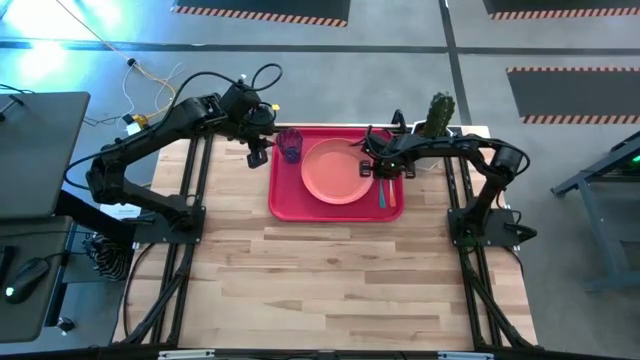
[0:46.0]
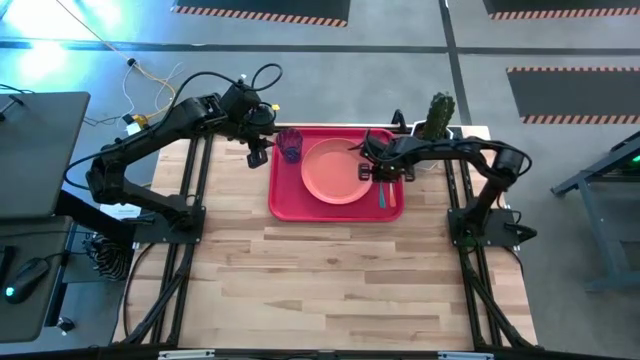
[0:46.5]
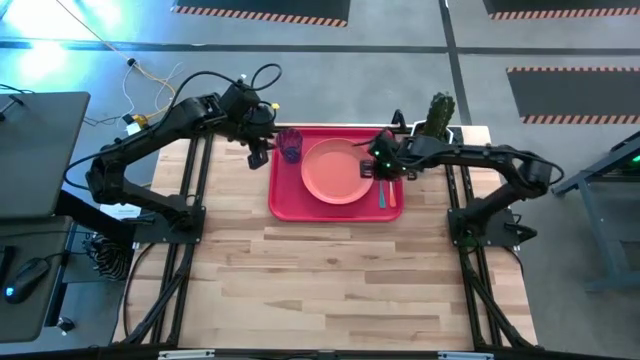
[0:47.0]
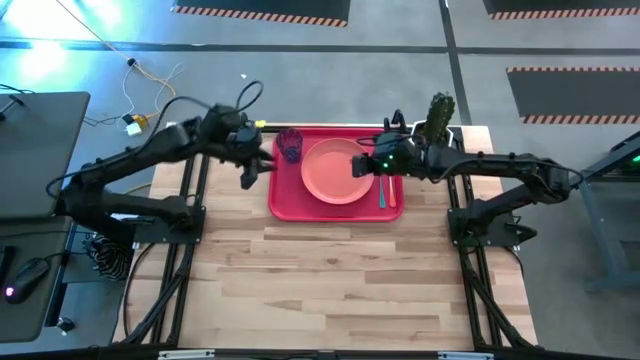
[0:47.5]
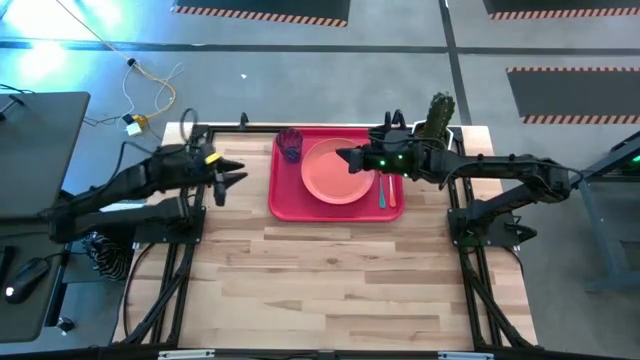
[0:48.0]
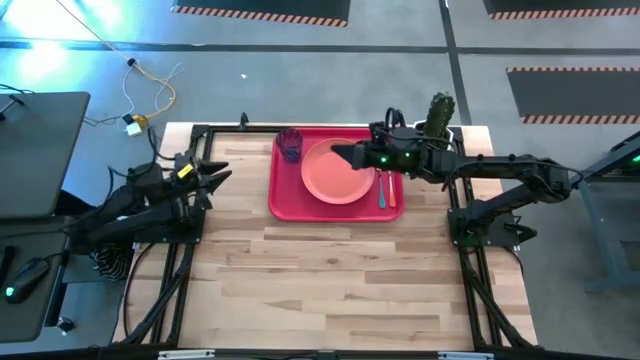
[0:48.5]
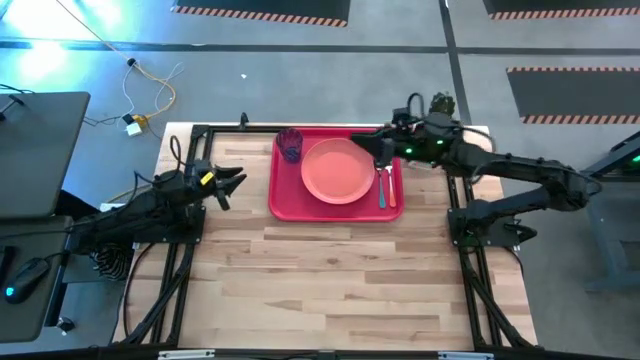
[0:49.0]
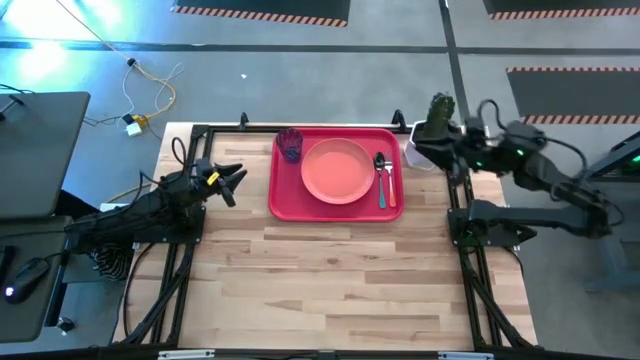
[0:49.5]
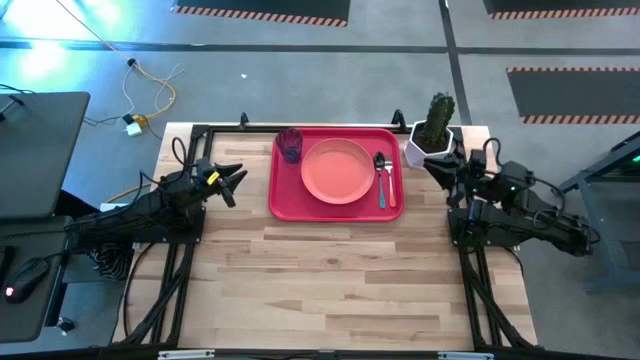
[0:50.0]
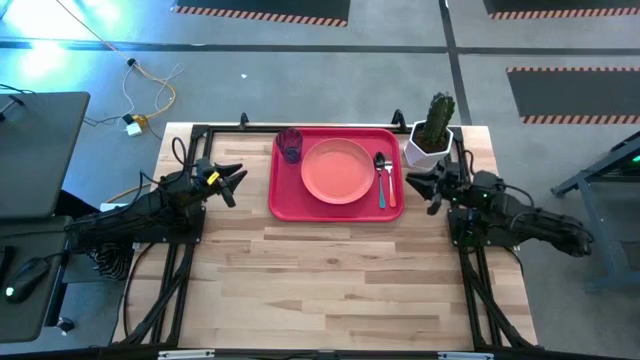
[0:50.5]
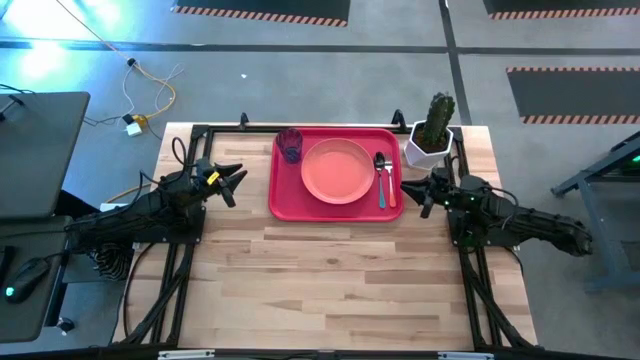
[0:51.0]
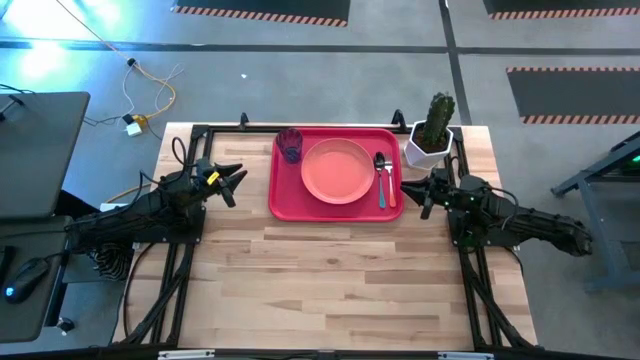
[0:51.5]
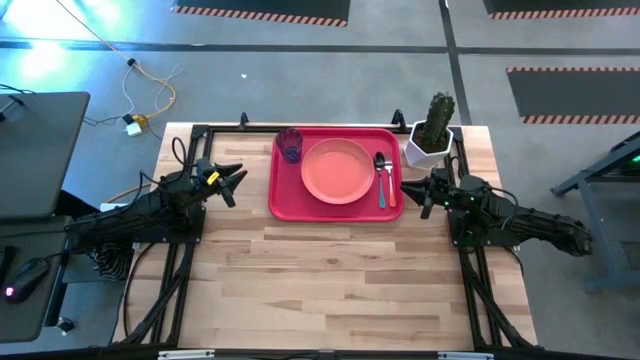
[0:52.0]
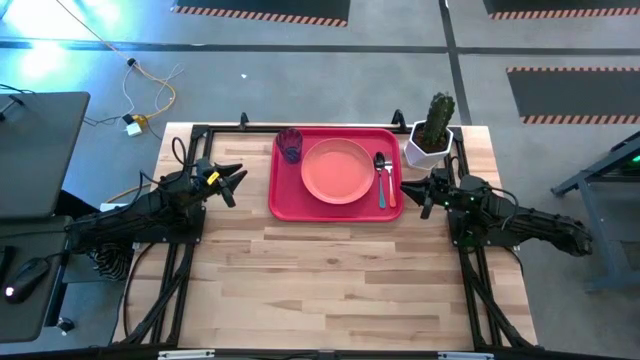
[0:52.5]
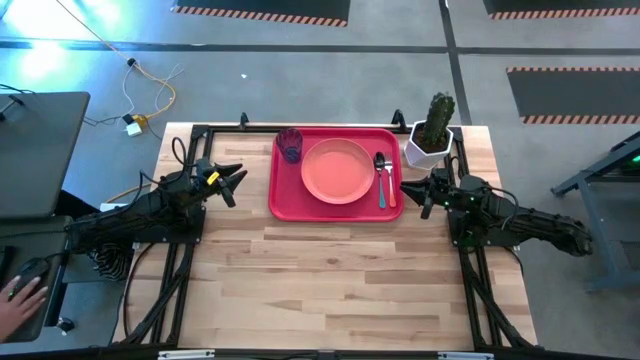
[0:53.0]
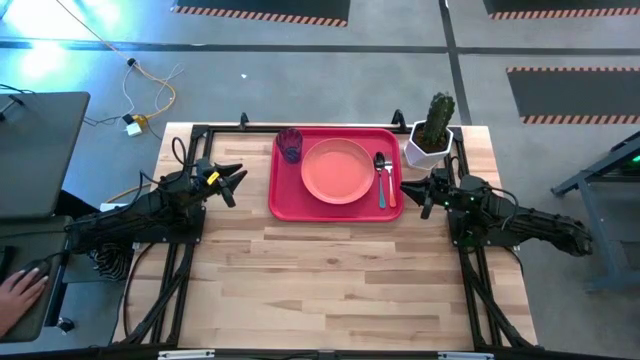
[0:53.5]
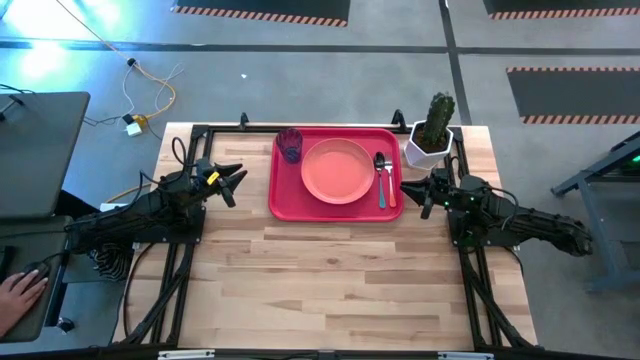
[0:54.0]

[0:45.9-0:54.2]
Task: Pick and place plate/cup/fork/spoon on tray
Return to Home Position

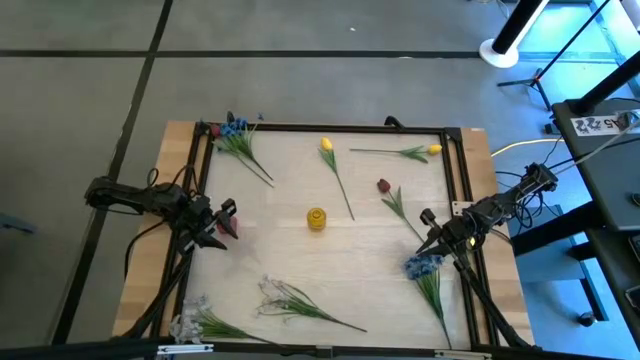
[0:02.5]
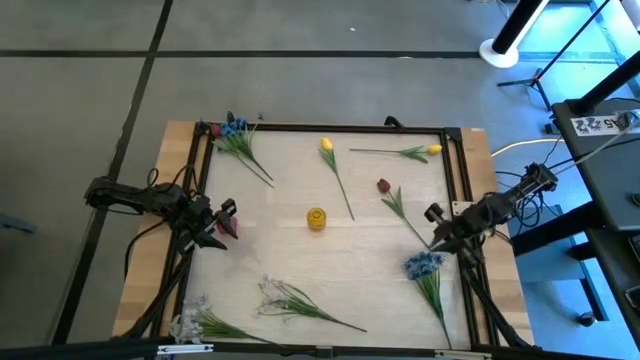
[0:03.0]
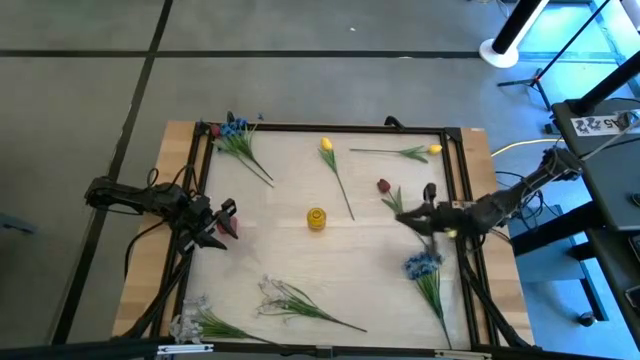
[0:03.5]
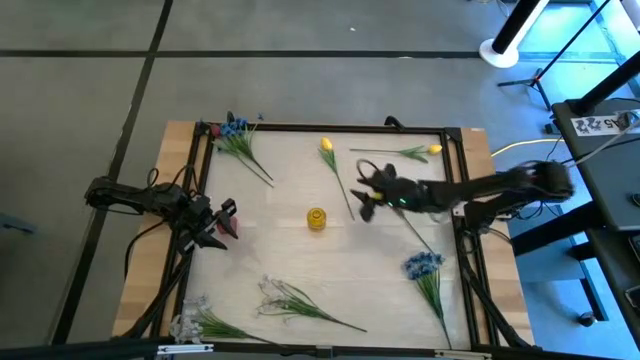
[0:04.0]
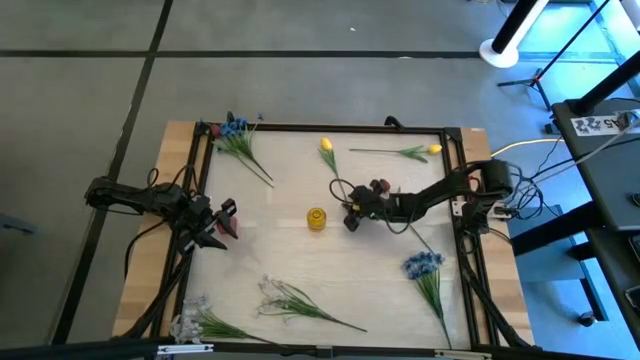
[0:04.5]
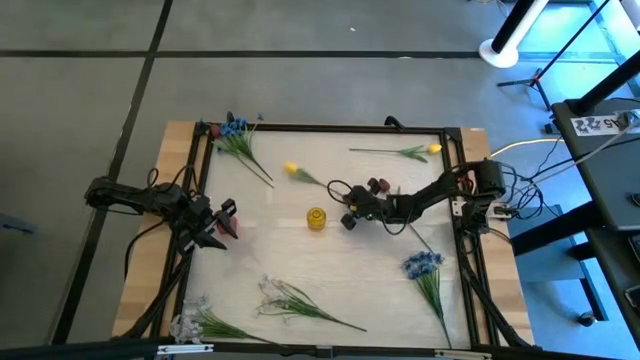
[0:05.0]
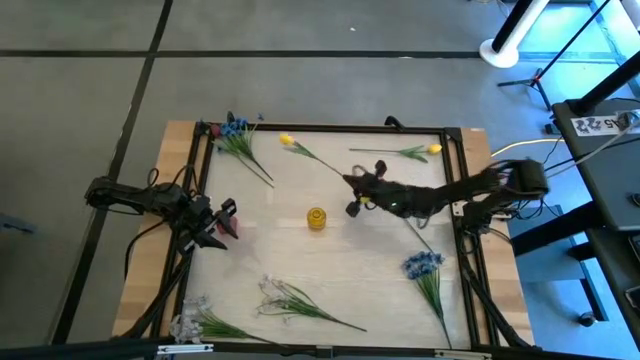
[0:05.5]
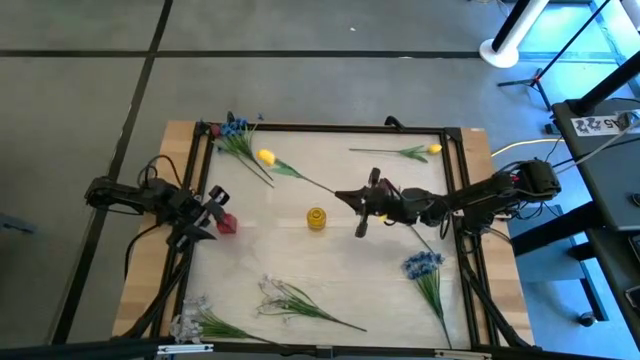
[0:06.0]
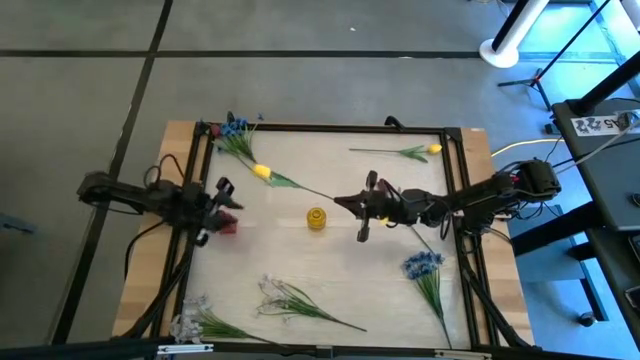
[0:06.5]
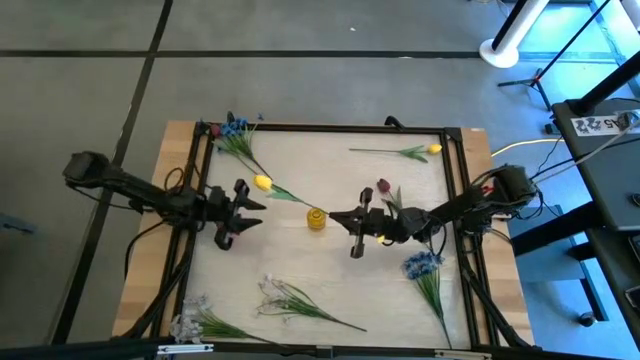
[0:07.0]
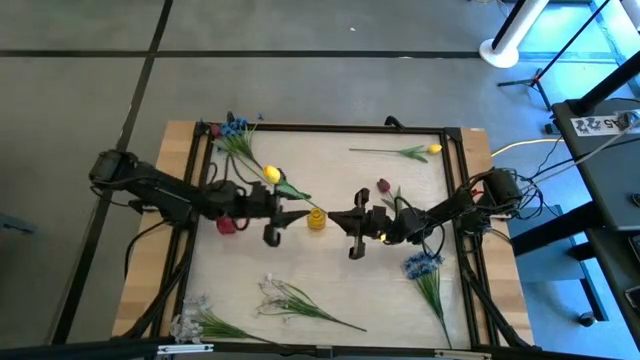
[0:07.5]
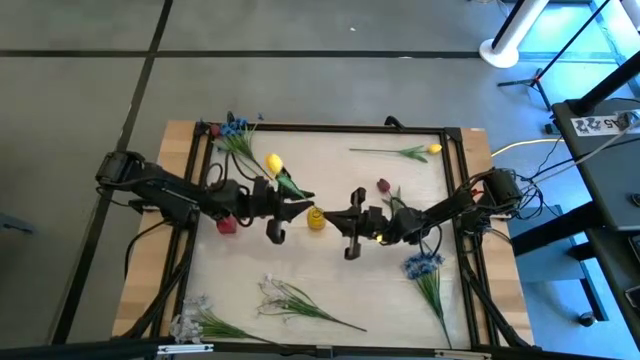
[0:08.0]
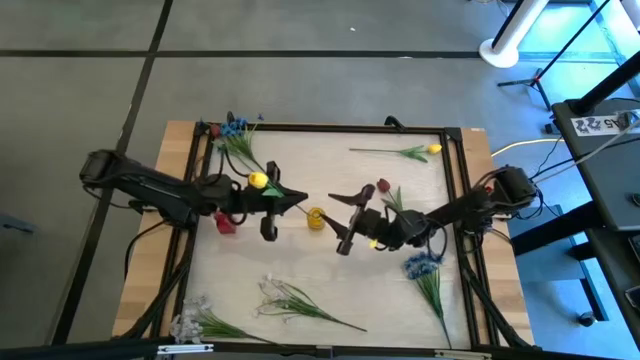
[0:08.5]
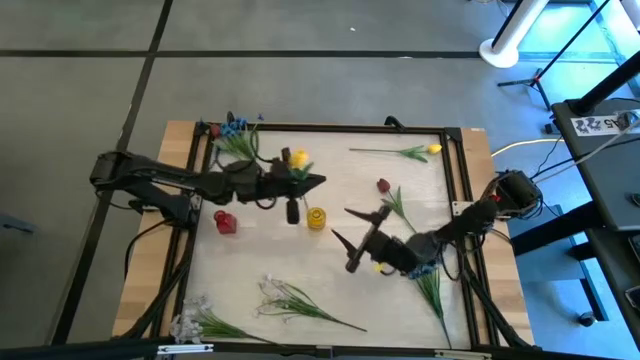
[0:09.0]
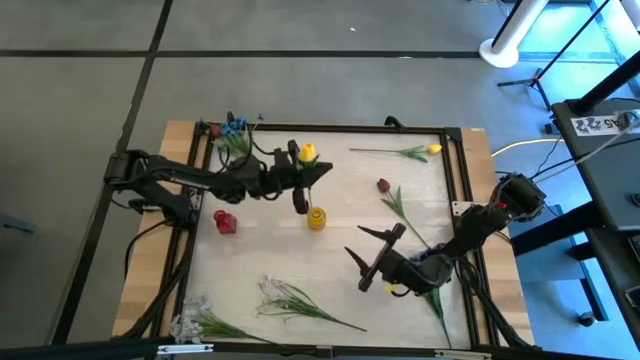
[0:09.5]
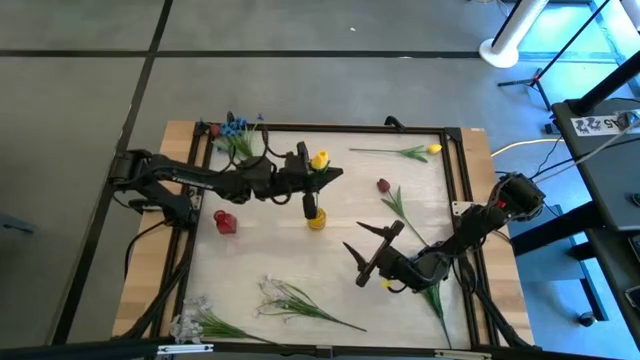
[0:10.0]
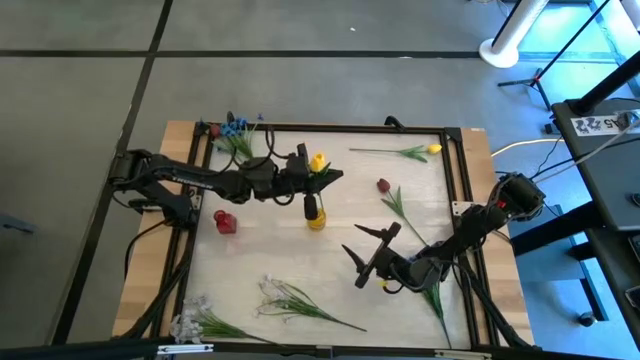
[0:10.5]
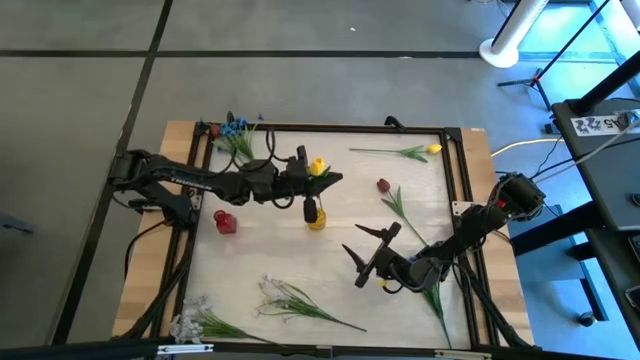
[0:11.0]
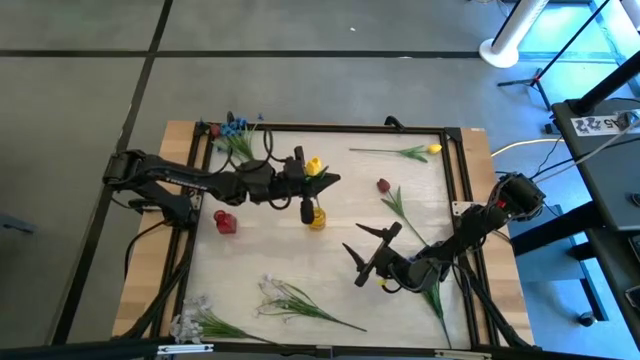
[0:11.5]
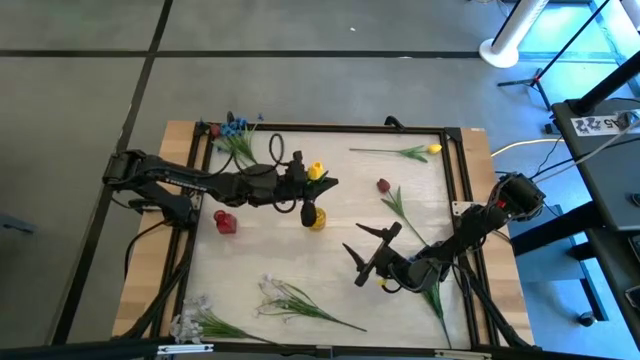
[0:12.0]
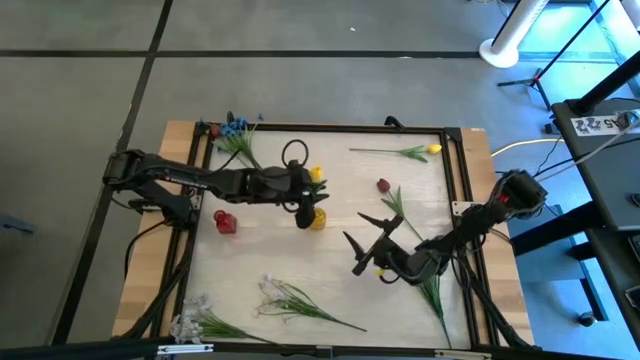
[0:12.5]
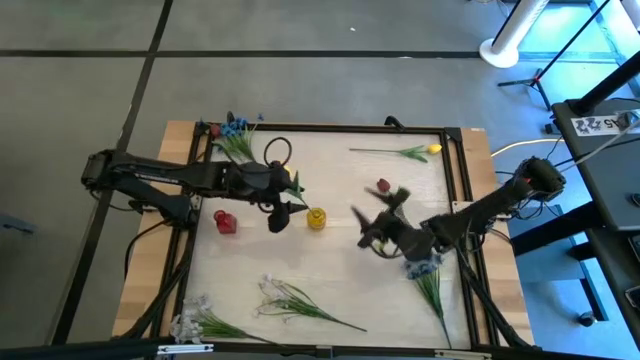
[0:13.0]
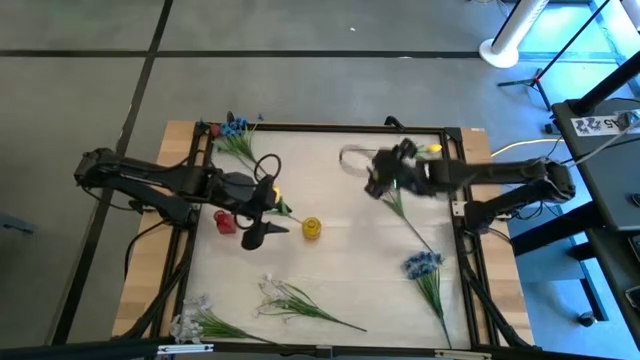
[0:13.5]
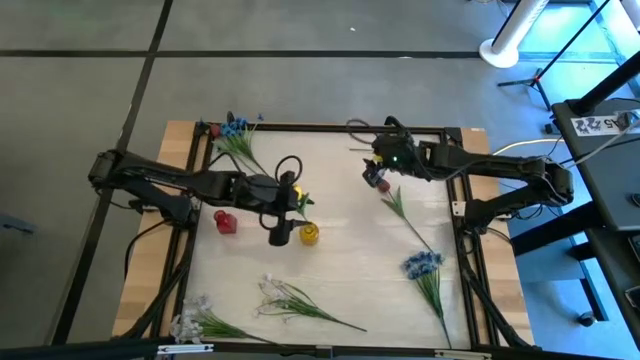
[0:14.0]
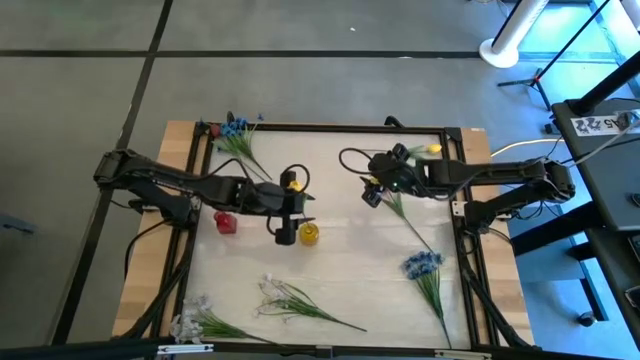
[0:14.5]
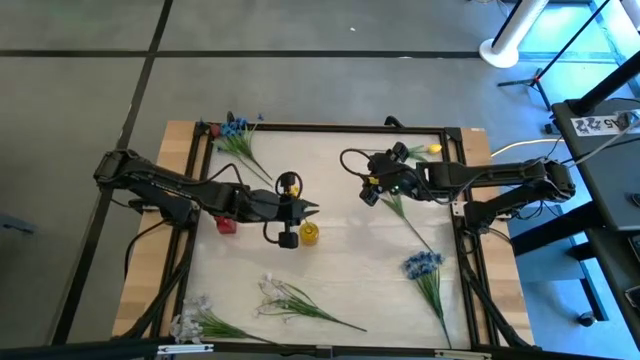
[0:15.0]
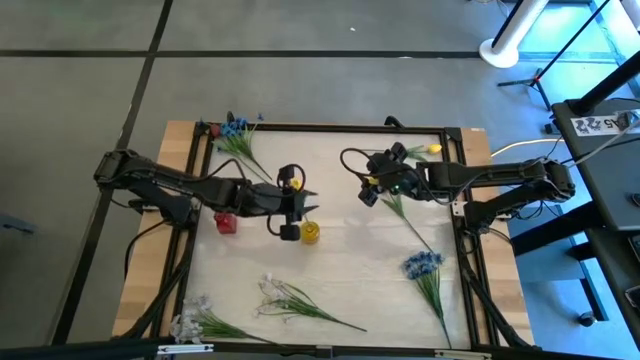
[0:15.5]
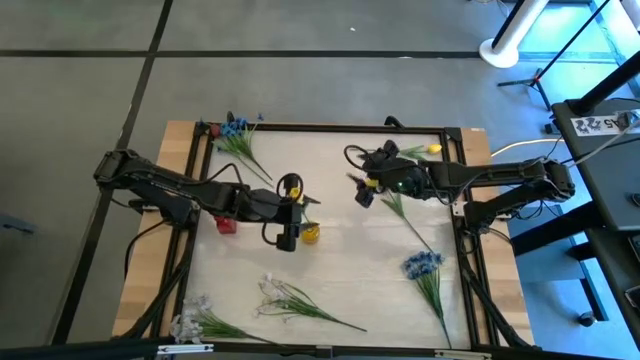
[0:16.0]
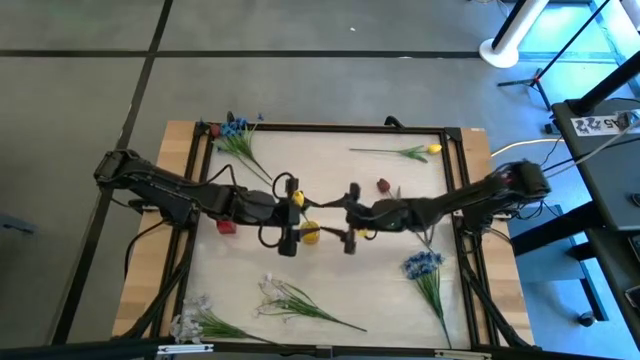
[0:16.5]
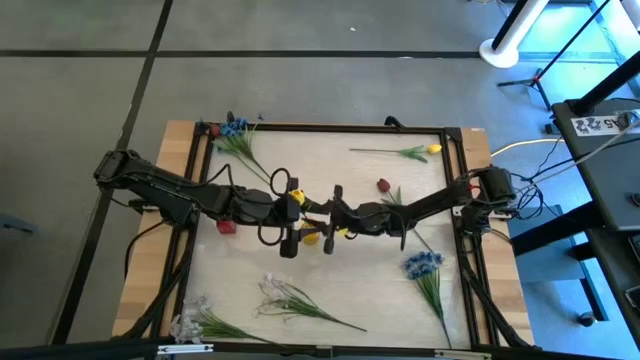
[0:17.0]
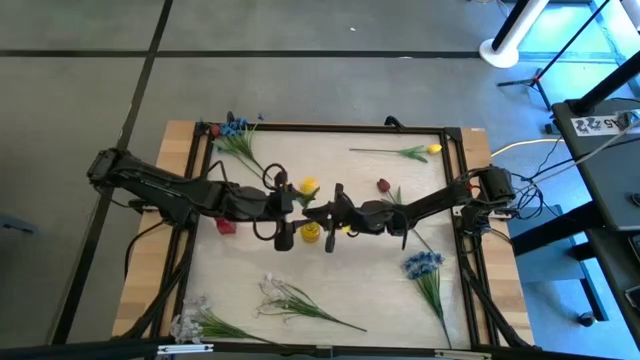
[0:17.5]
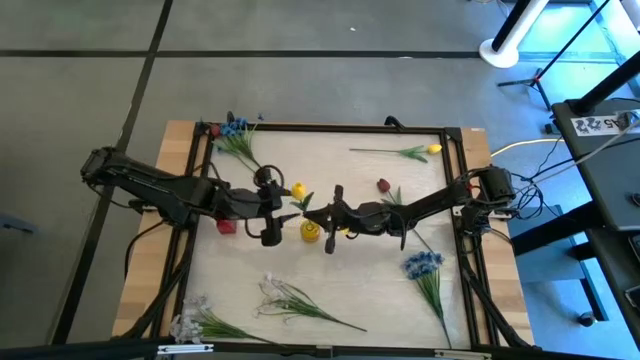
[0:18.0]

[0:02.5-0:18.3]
Task: Sort flowers into vase by color
Put the left yellow tulip into the yellow flower vase
